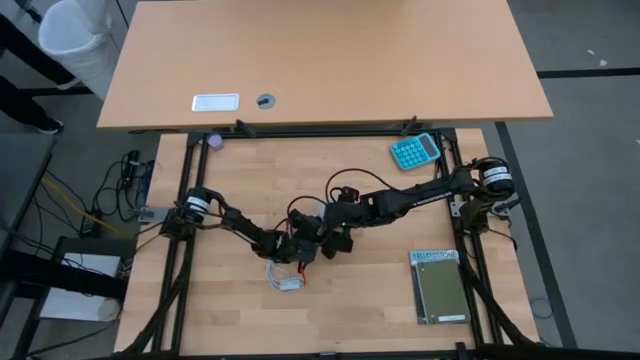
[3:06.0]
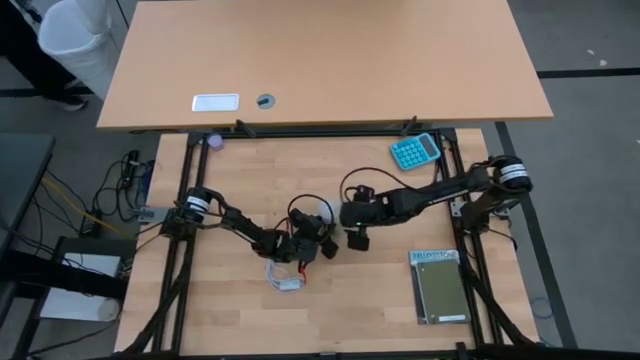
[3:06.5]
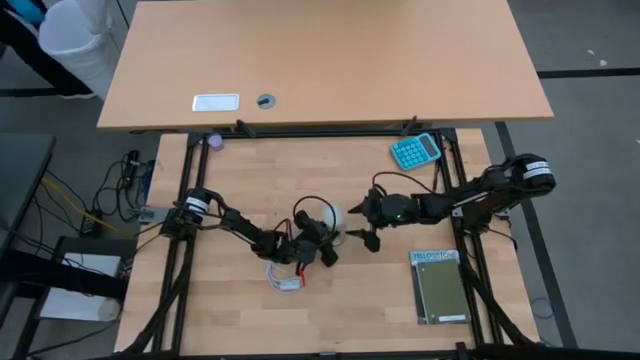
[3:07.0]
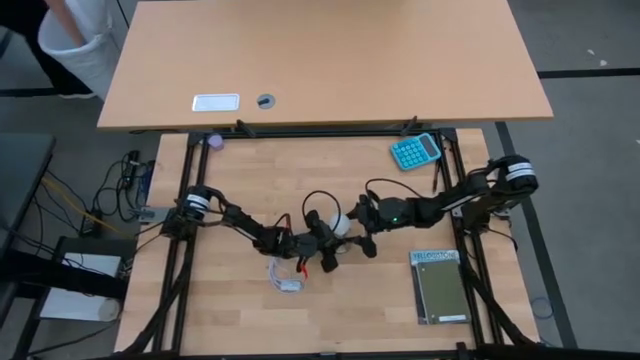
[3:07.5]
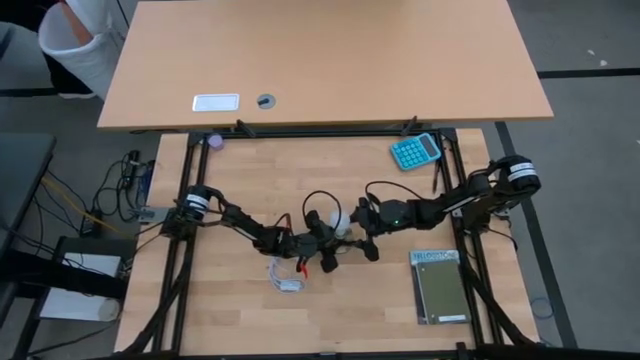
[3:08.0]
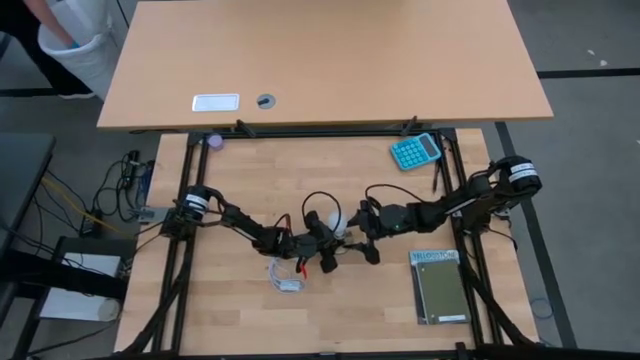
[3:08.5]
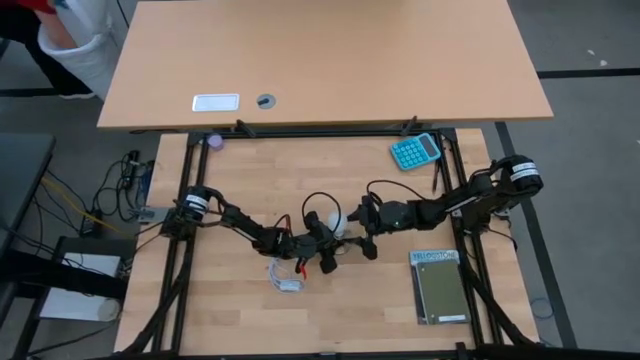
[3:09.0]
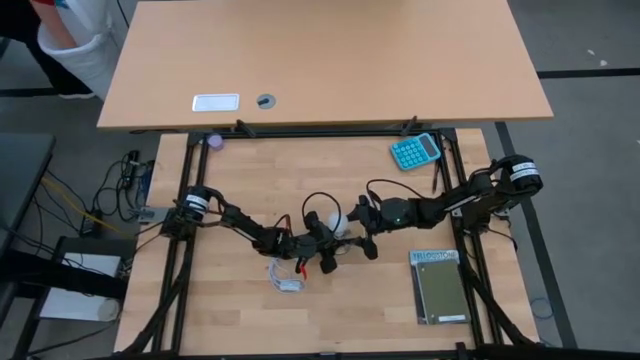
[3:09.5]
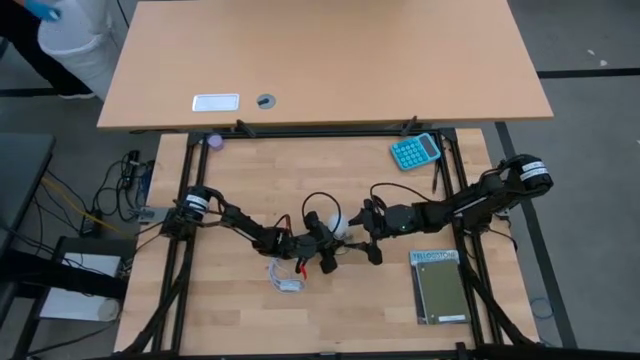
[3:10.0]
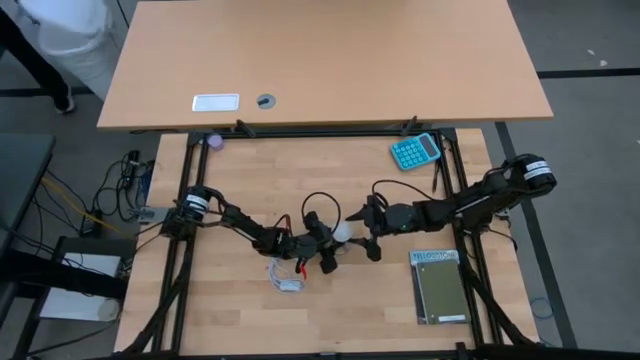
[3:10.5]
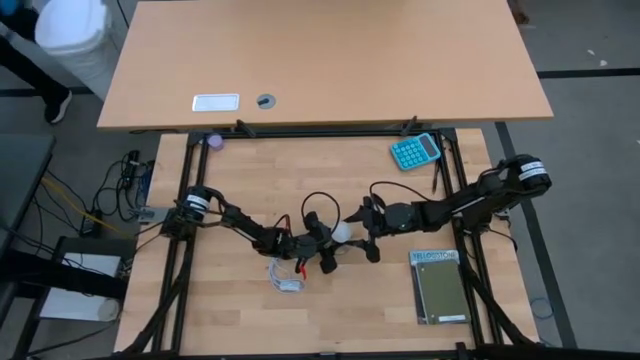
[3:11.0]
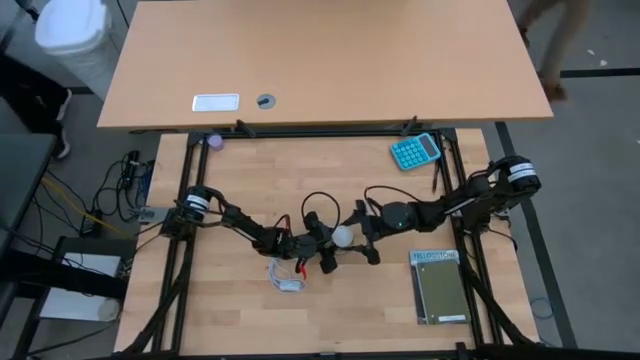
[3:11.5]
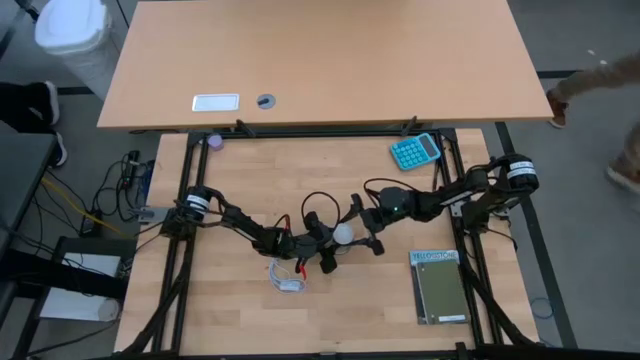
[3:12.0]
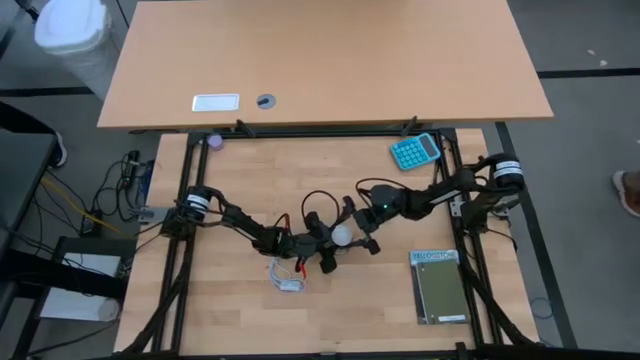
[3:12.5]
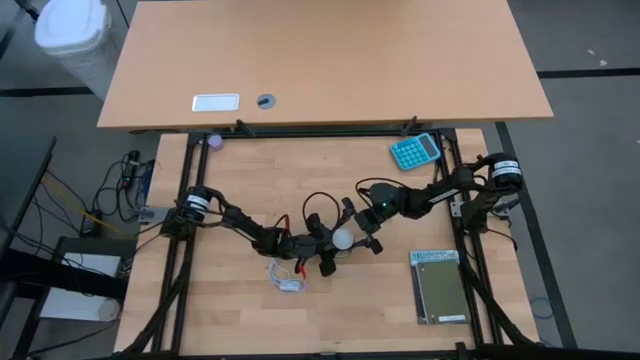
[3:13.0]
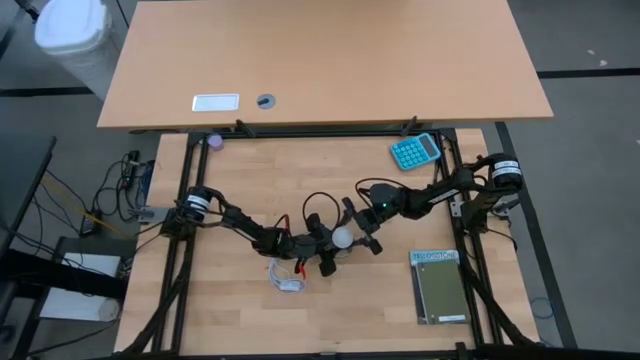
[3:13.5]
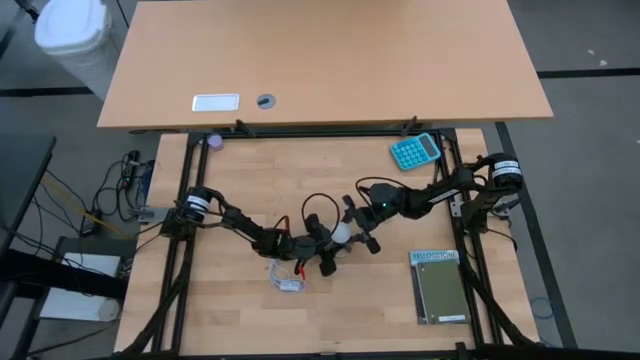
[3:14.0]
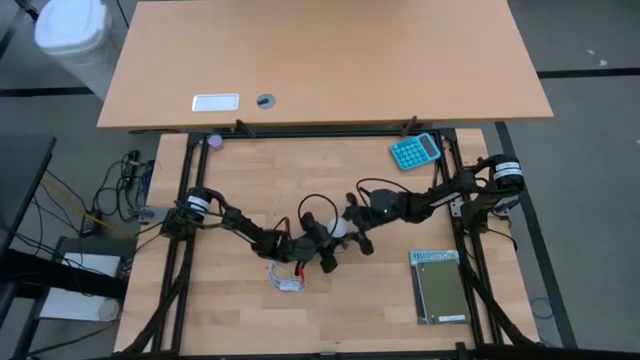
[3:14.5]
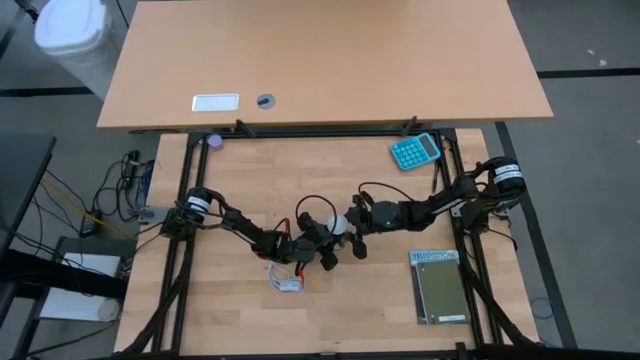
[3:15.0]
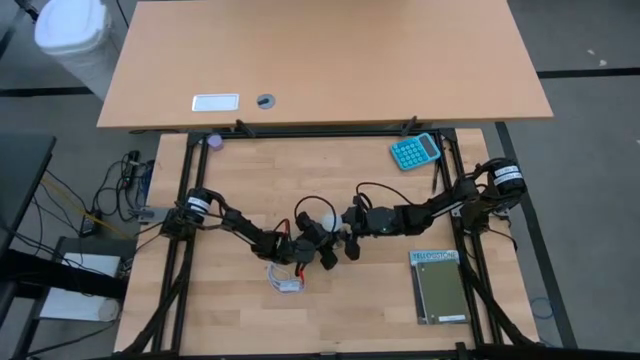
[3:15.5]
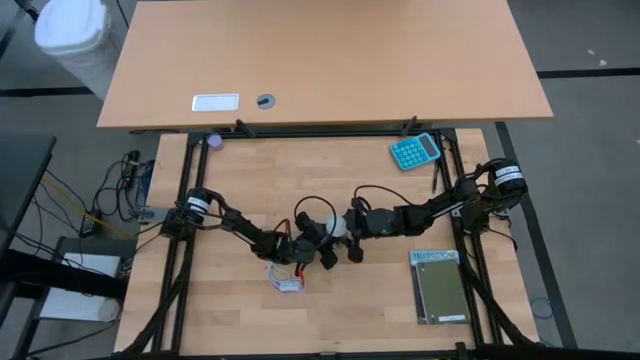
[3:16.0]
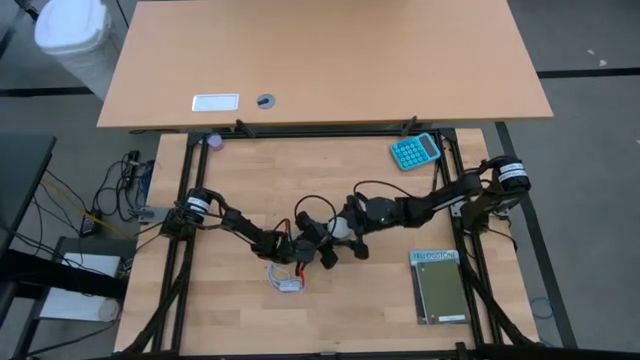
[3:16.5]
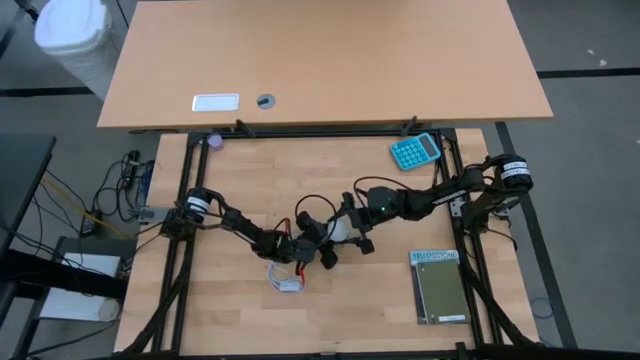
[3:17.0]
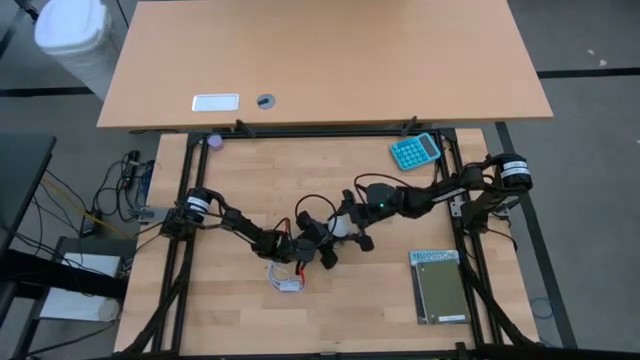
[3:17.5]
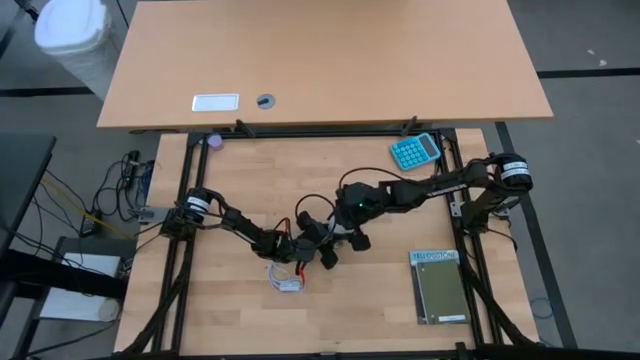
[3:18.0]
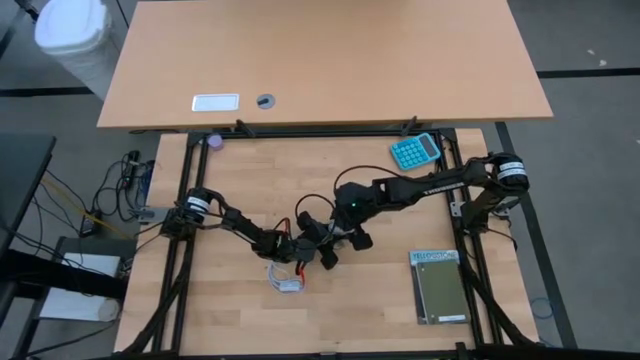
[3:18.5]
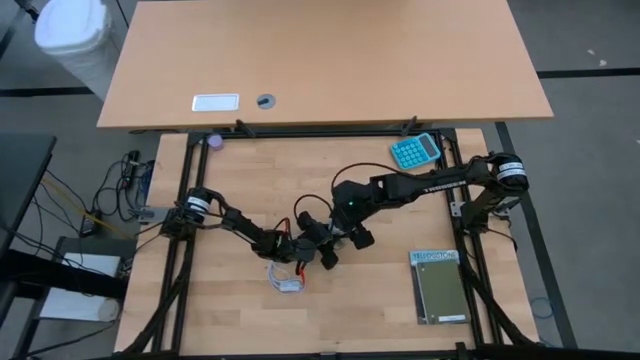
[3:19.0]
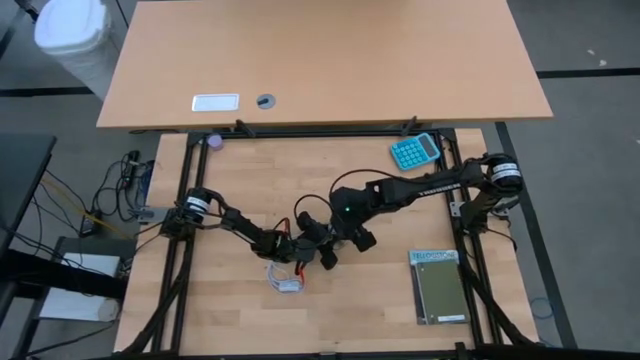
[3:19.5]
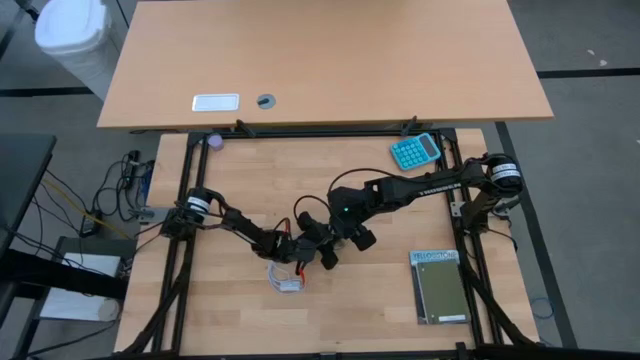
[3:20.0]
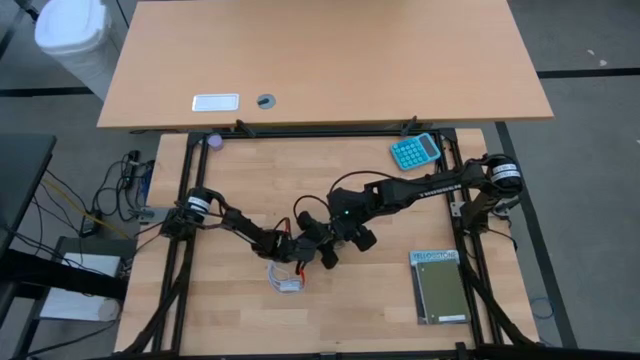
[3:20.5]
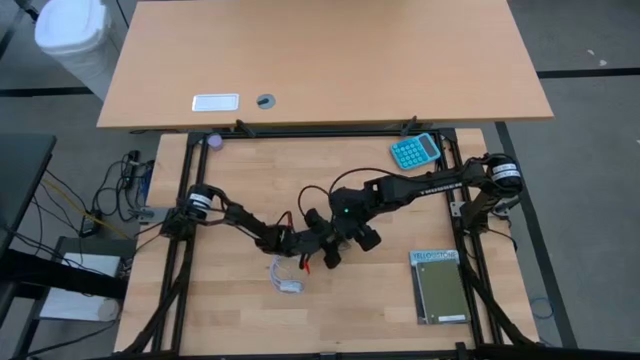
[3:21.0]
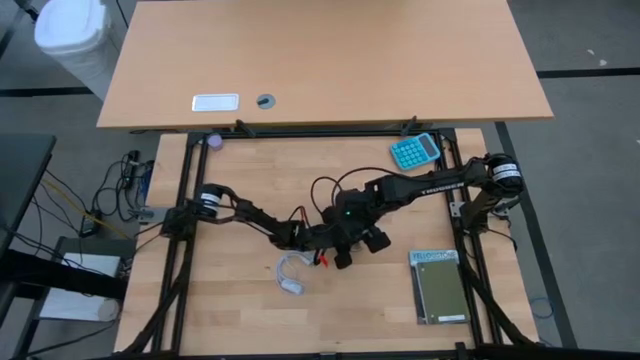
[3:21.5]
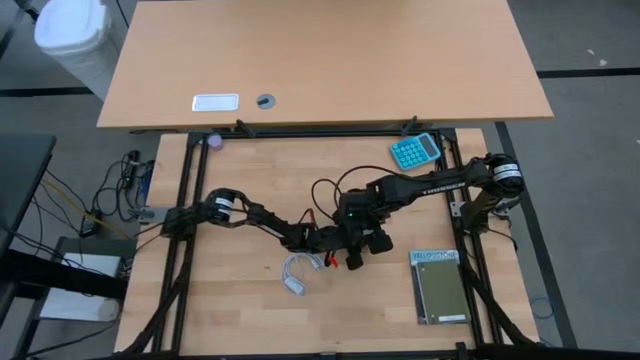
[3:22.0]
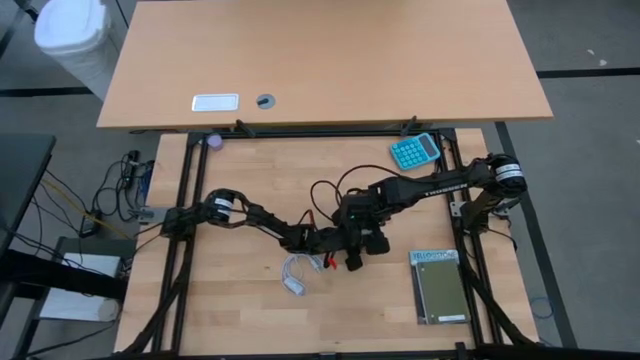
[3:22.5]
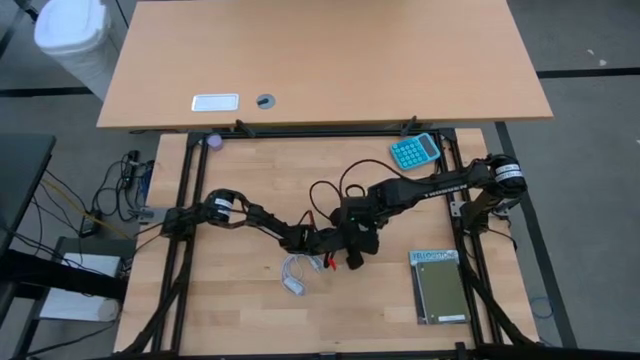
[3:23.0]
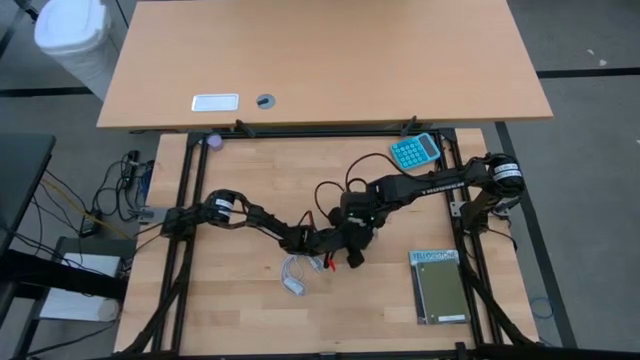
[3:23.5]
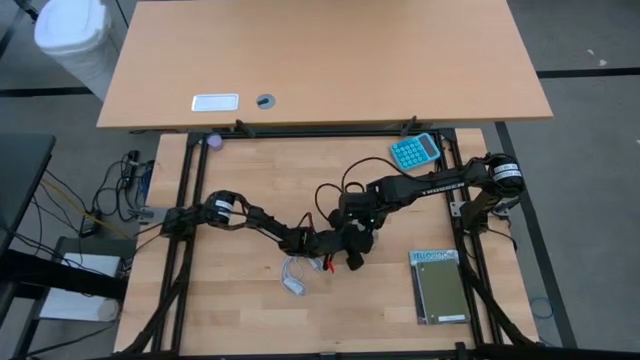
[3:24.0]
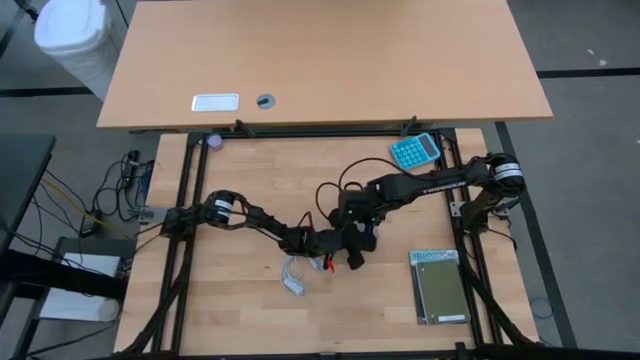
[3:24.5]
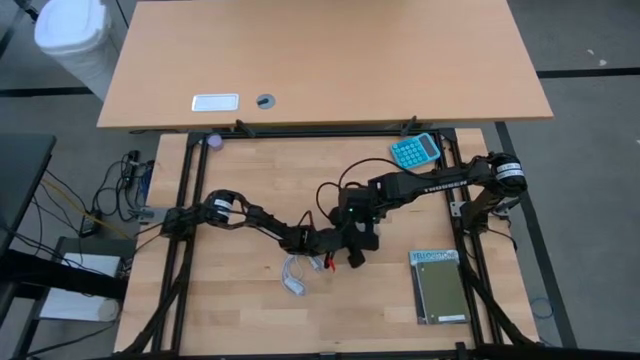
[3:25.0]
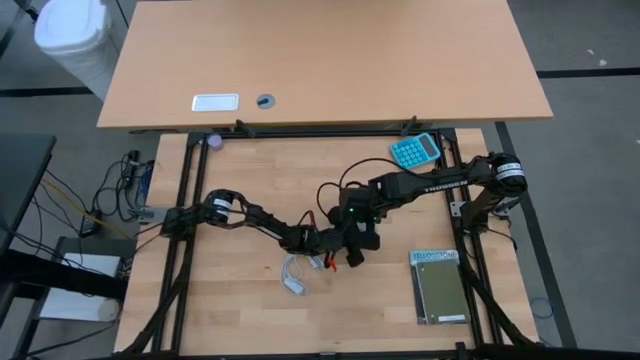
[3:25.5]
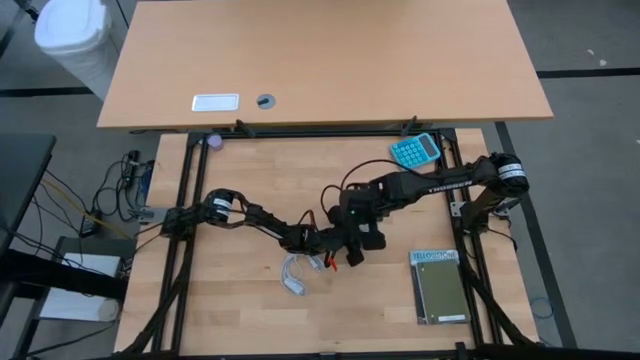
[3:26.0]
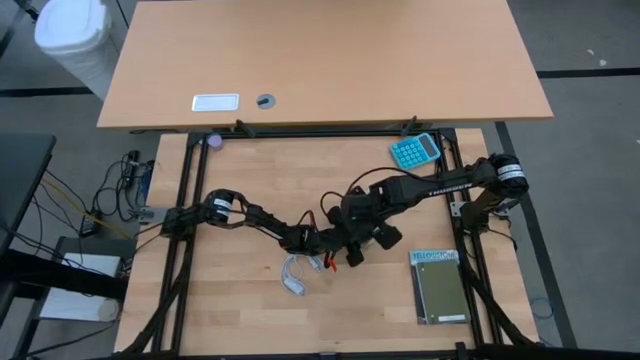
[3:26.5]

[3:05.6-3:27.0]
Task: Screw lightbulb
Insert the lightbulb into the socket
